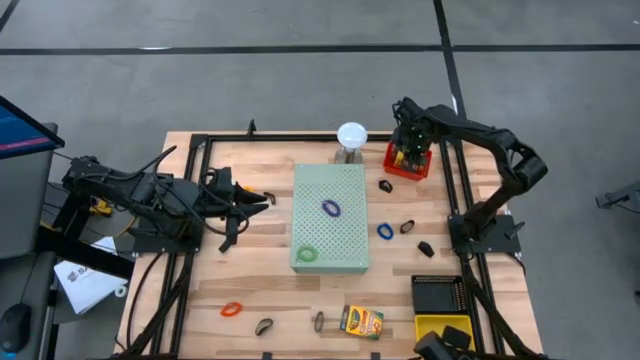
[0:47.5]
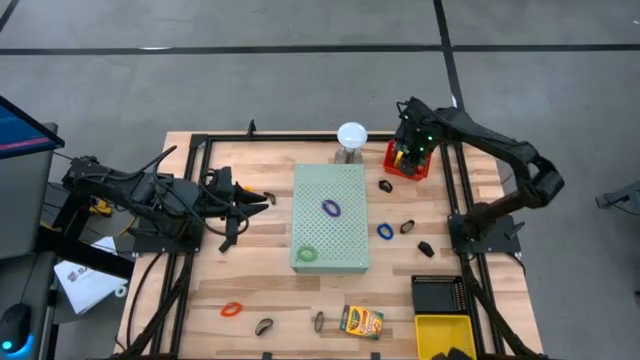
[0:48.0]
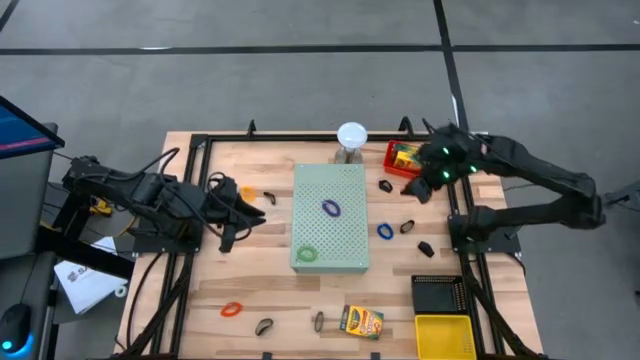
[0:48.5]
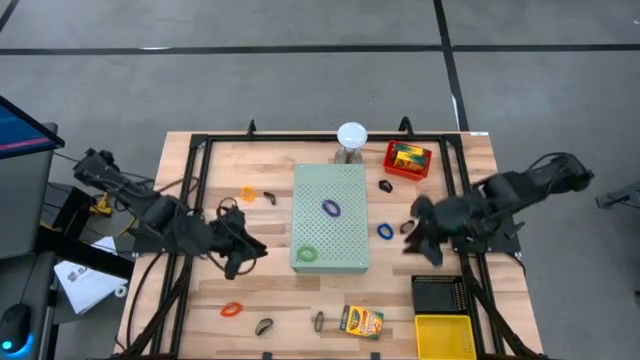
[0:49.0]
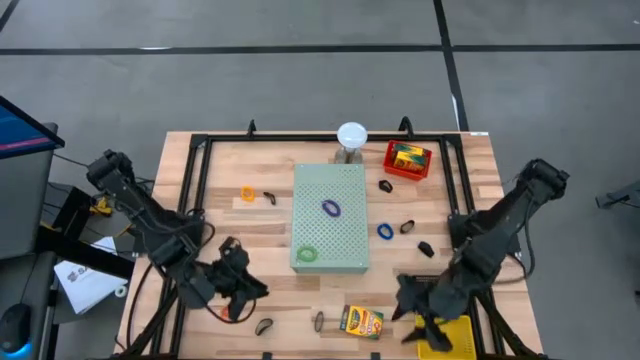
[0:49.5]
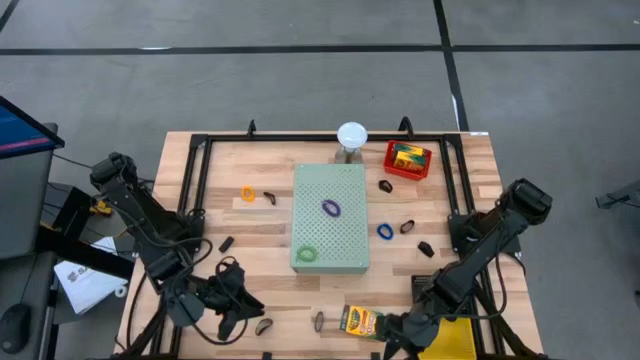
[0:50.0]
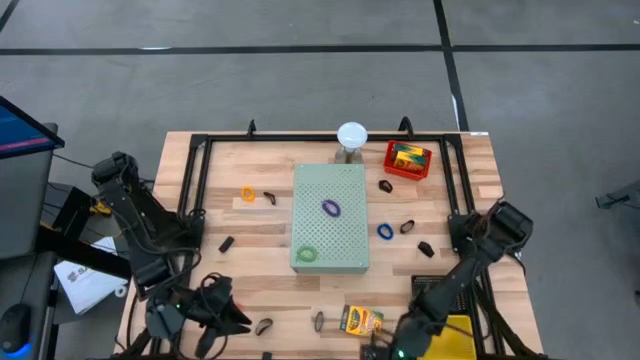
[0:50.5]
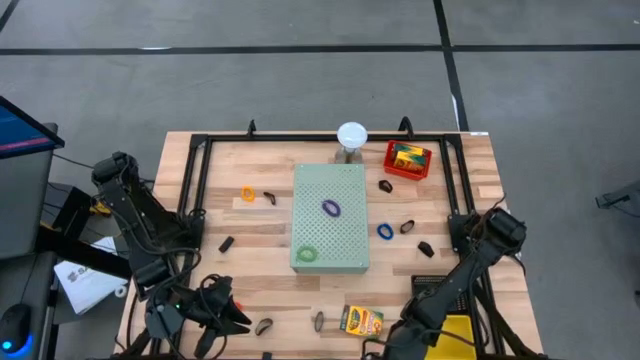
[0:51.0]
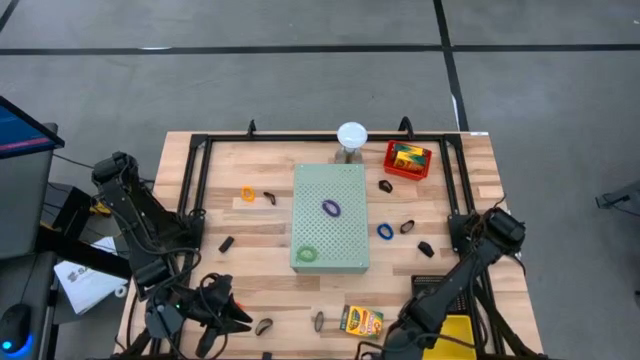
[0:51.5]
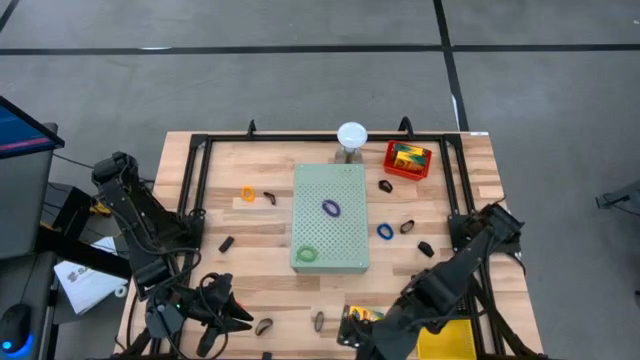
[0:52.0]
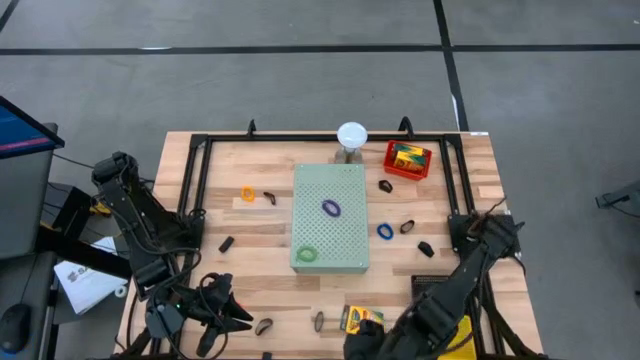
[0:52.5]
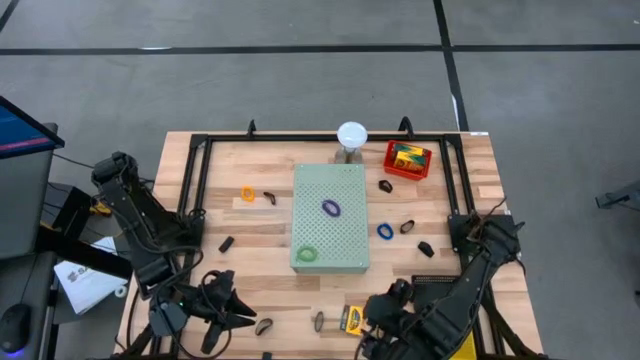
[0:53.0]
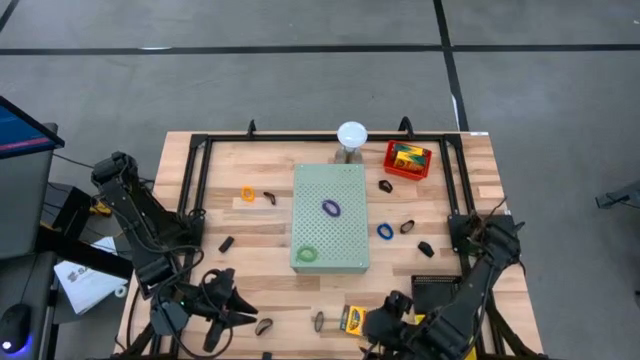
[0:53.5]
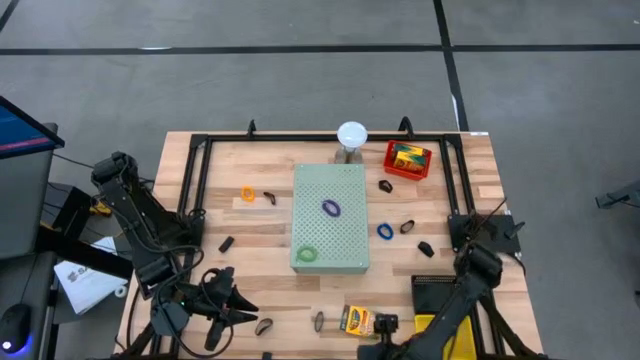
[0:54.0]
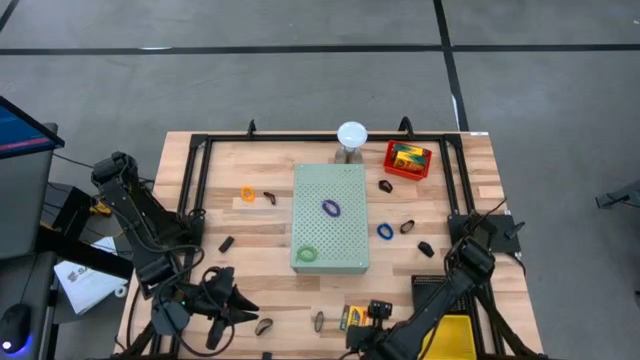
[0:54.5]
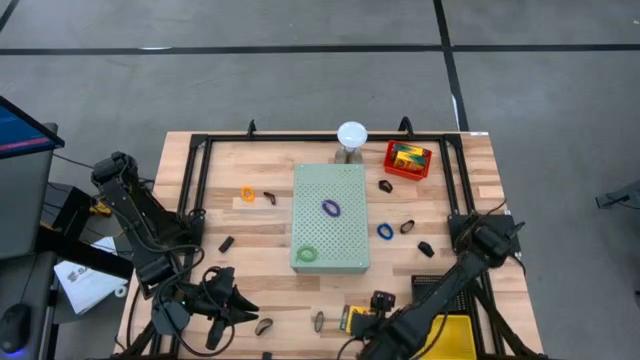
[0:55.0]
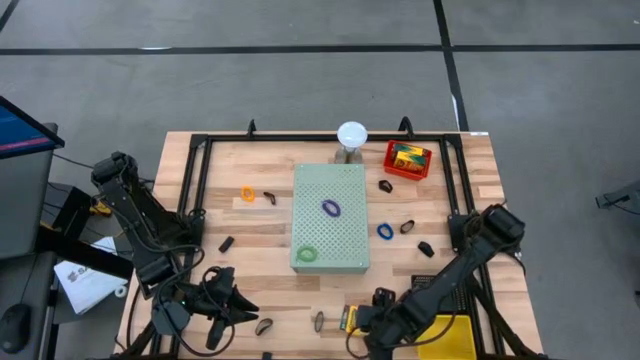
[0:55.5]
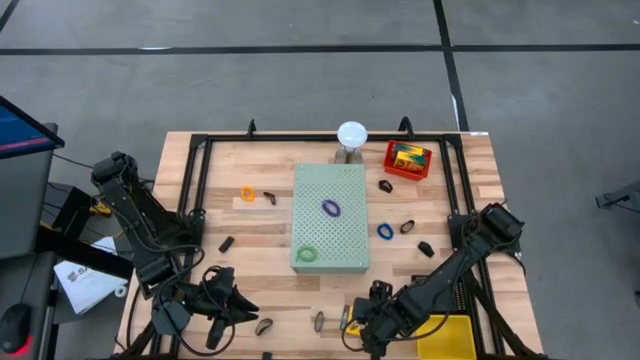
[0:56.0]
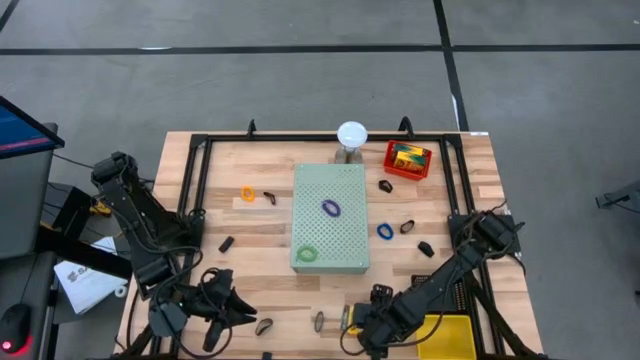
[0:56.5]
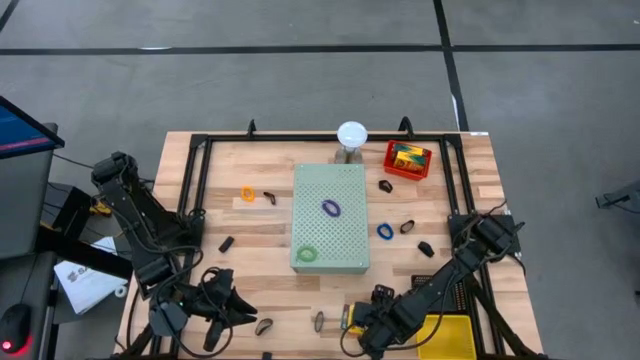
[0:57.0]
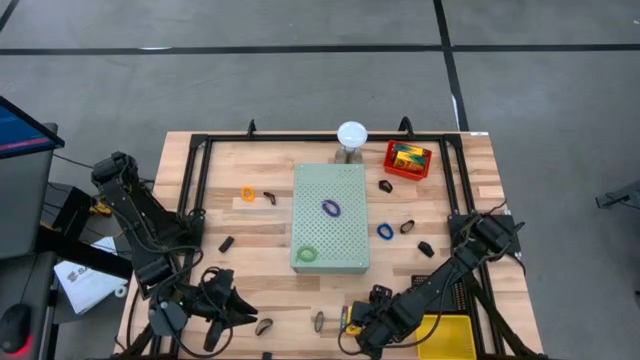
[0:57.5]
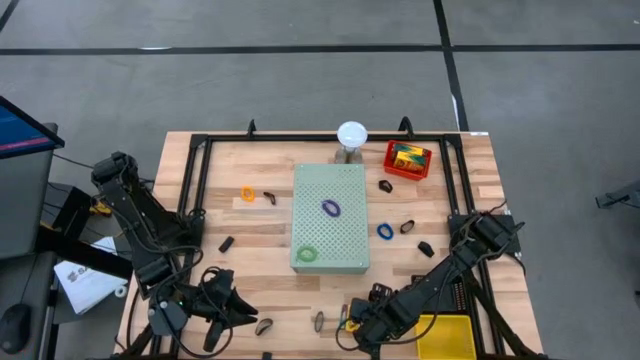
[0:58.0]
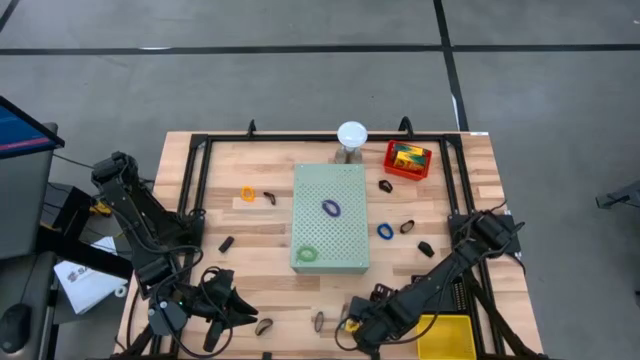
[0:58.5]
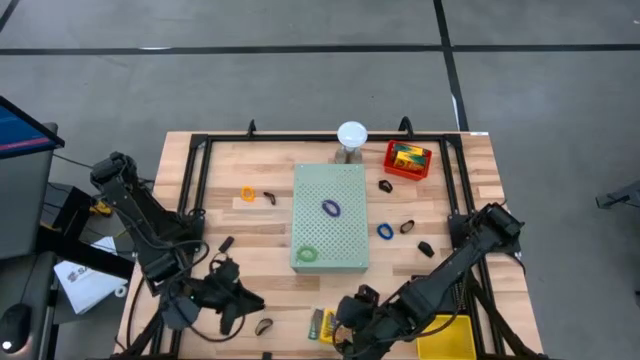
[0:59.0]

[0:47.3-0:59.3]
Task: Pick & Place Office Desk Supplies
Put the yellow crayon box into the red bin

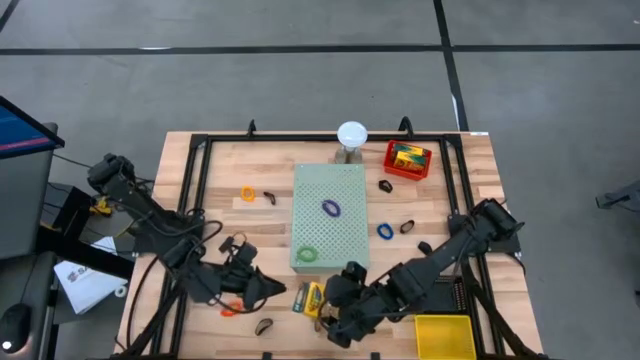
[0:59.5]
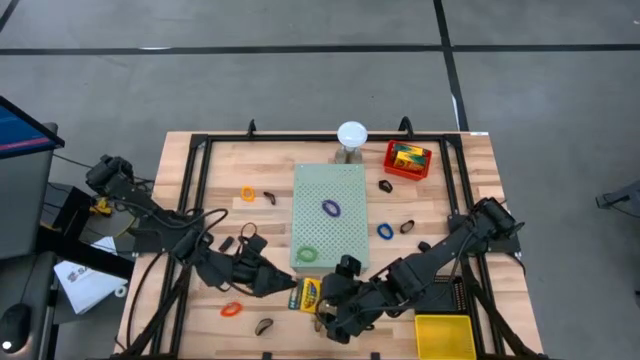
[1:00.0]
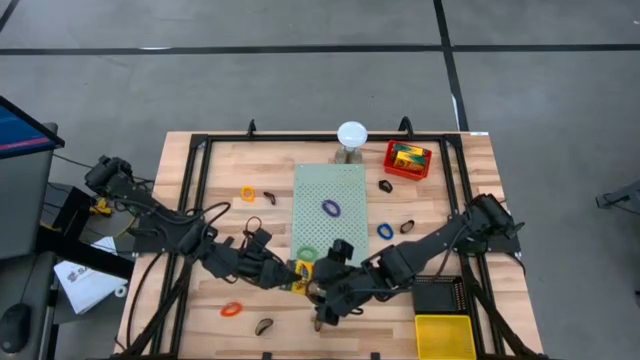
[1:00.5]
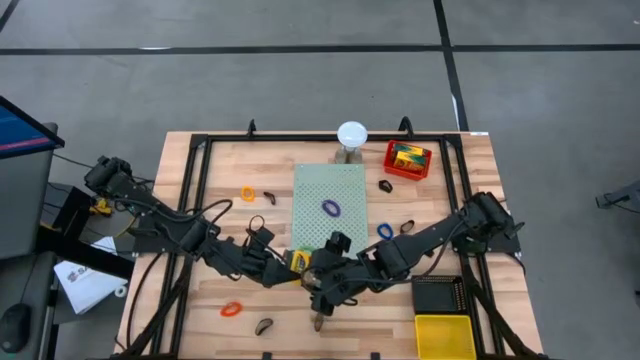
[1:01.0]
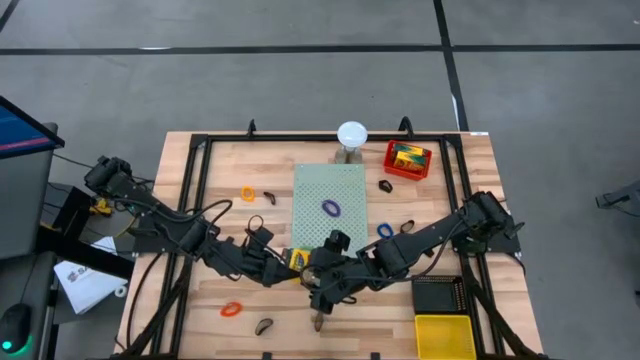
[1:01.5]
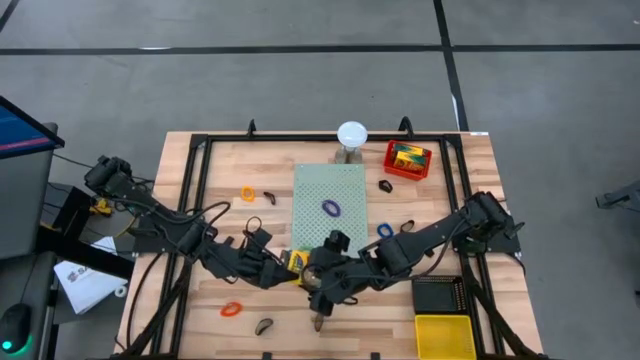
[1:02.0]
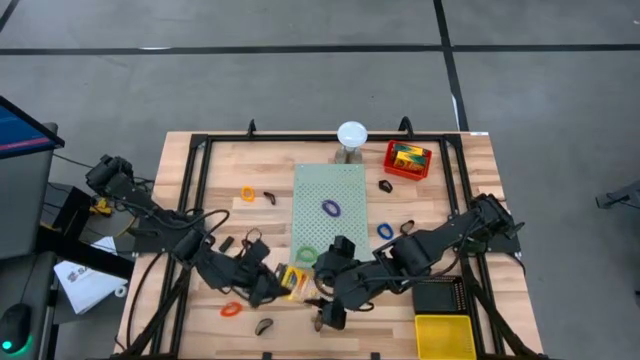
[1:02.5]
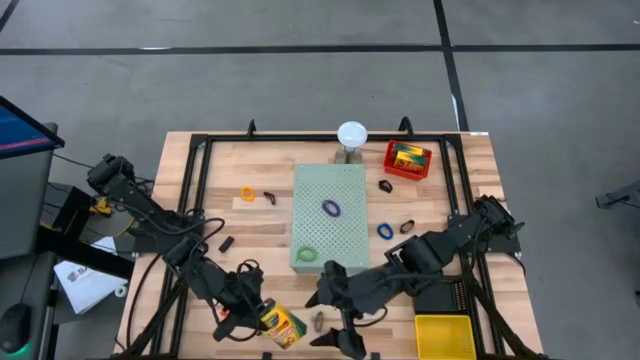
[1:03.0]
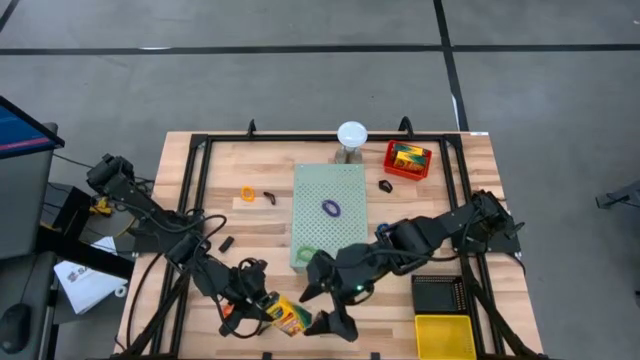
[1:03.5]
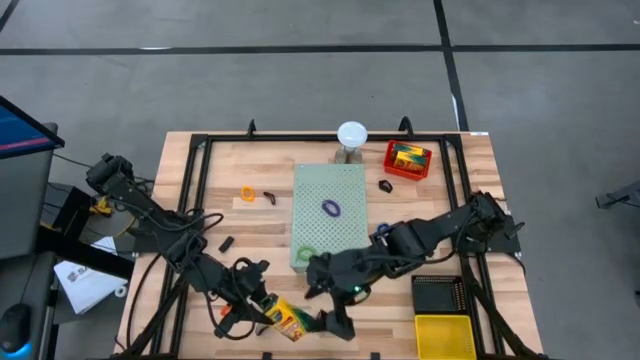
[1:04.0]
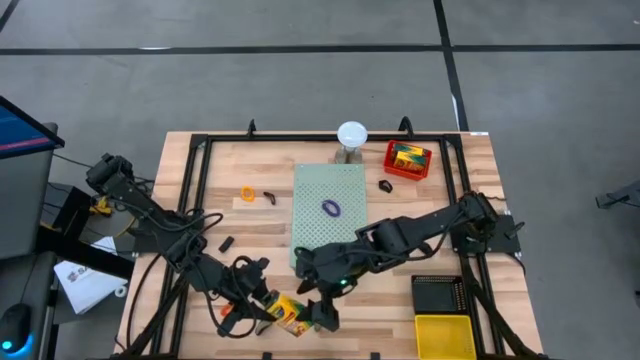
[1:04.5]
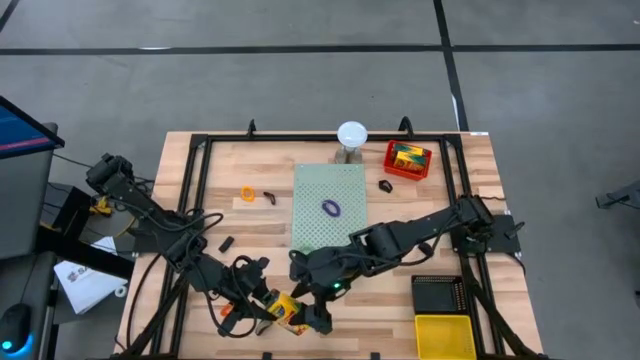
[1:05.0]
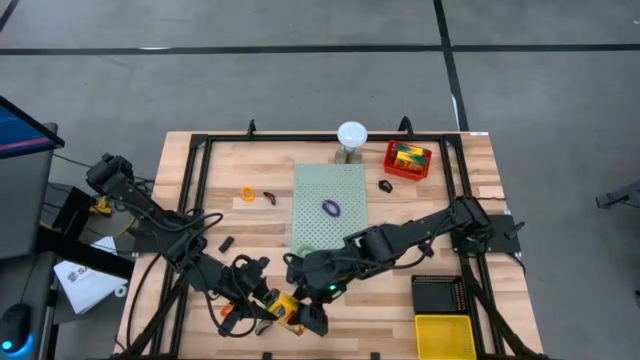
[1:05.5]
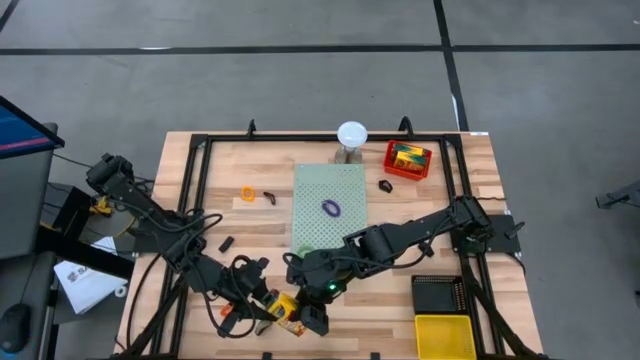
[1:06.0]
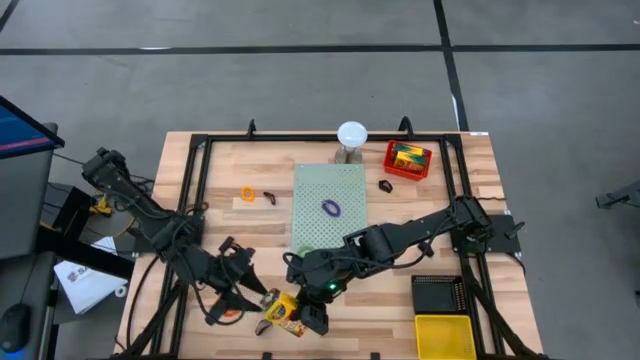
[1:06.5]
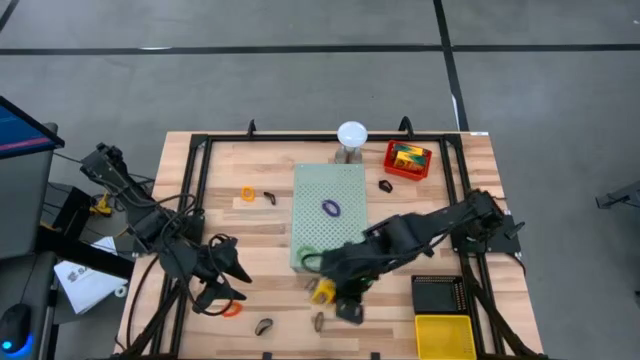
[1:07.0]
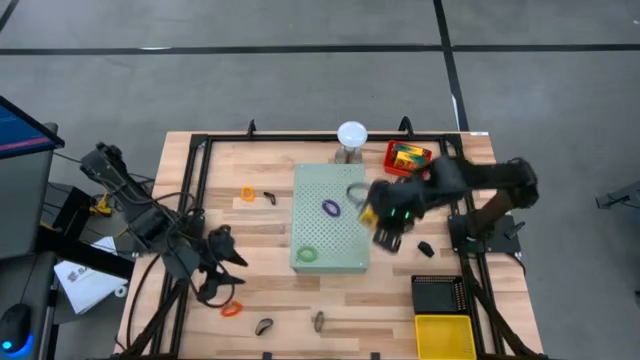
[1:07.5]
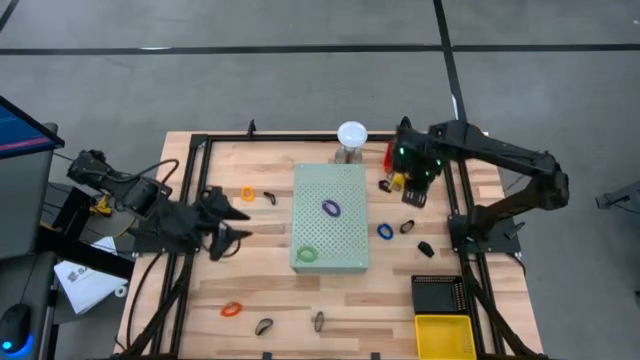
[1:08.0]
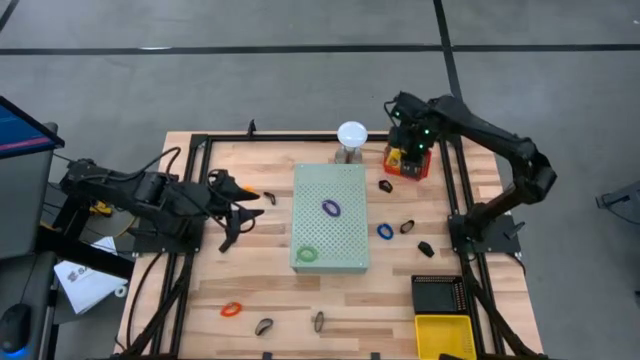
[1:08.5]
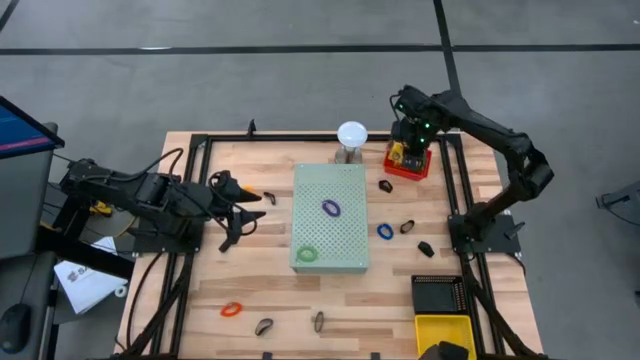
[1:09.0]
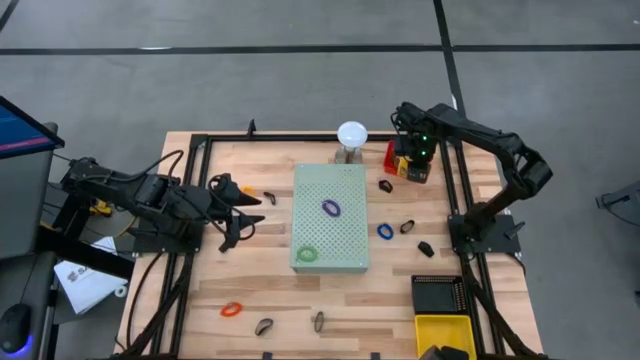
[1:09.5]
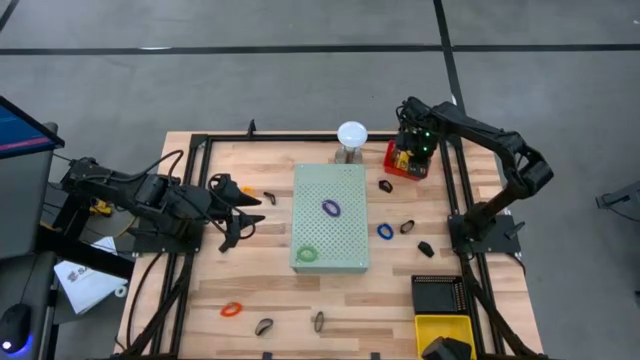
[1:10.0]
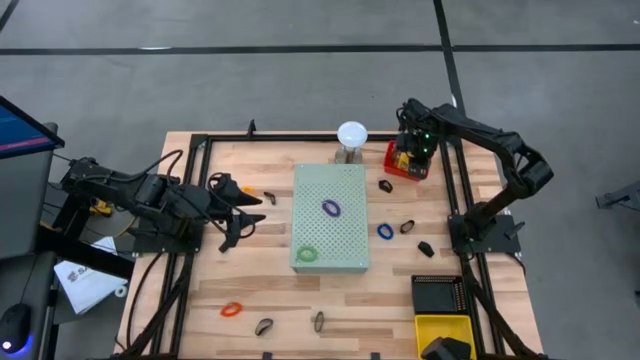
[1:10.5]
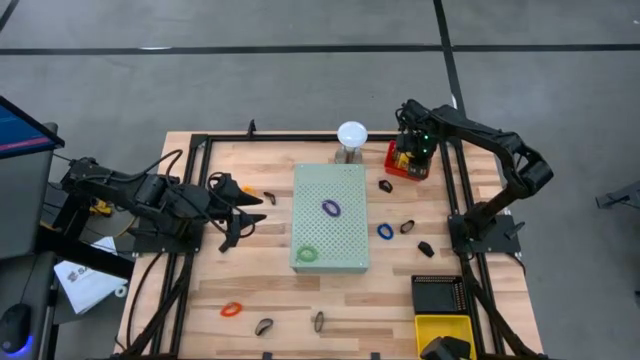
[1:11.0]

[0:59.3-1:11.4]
Put the yellow crayon box into the red bin
